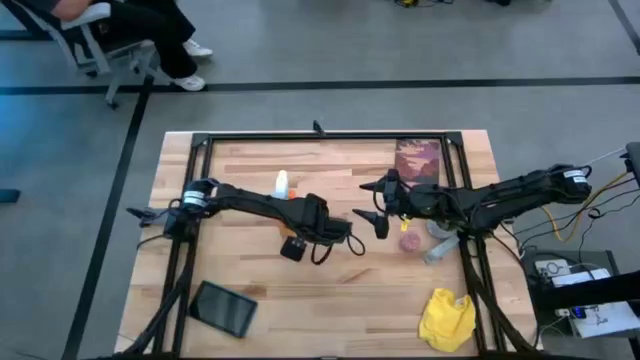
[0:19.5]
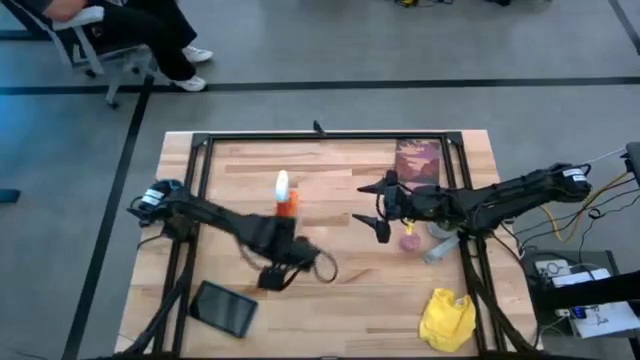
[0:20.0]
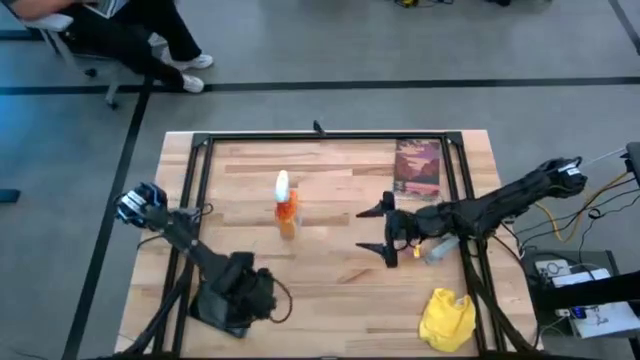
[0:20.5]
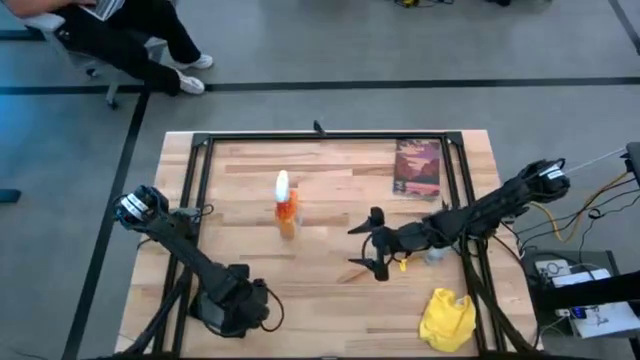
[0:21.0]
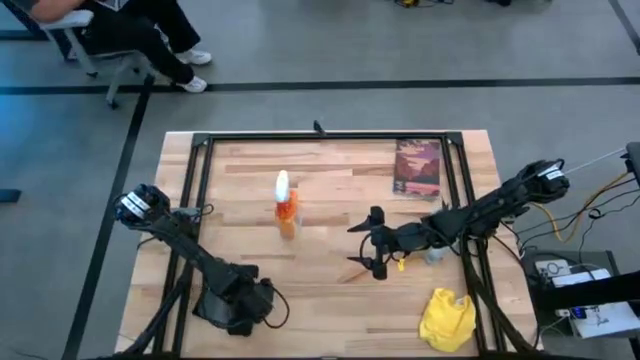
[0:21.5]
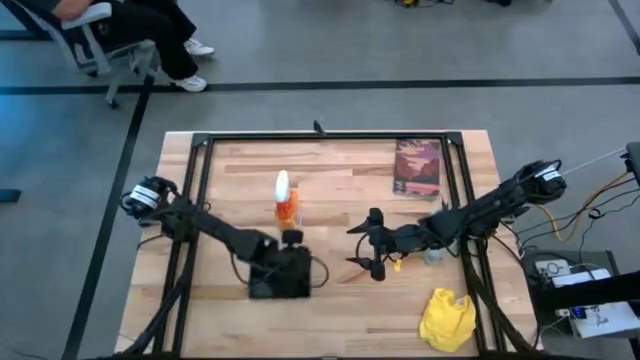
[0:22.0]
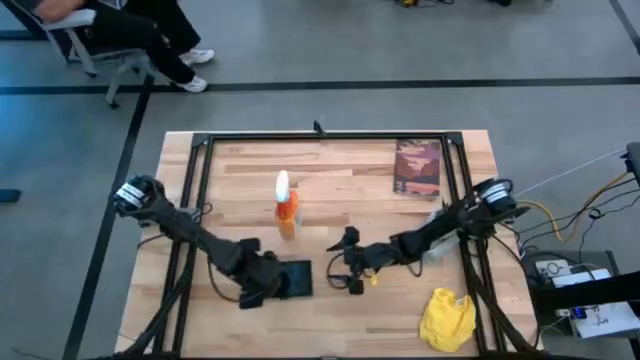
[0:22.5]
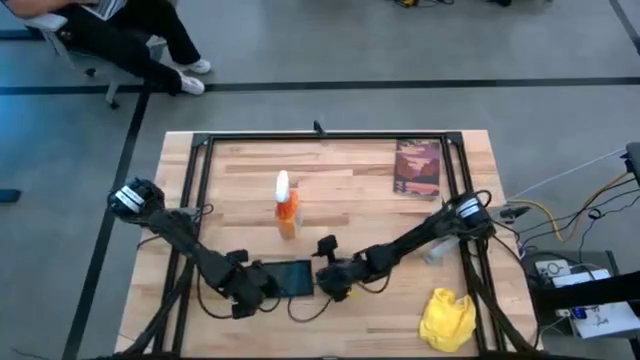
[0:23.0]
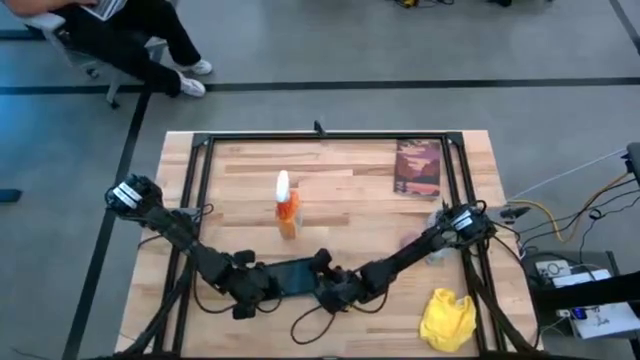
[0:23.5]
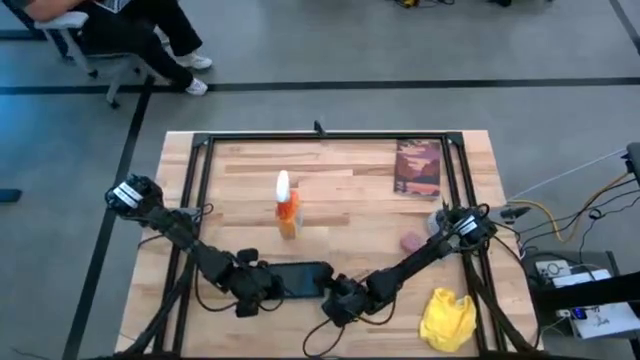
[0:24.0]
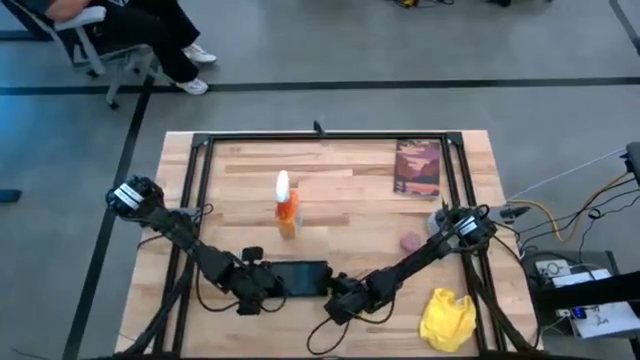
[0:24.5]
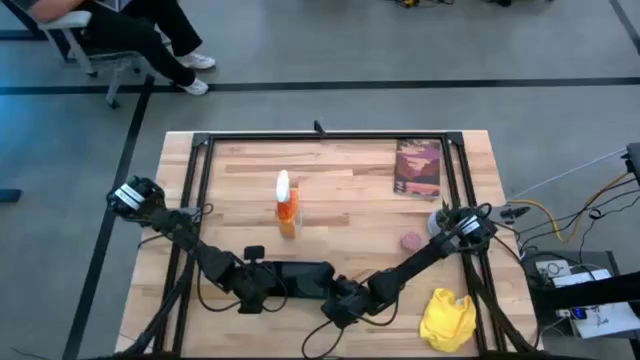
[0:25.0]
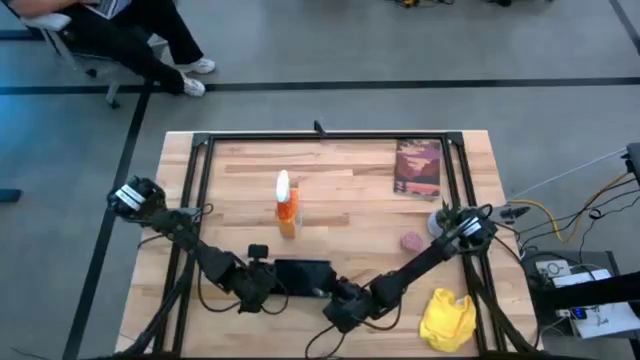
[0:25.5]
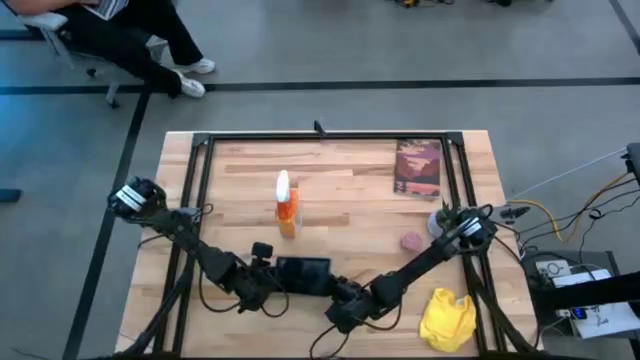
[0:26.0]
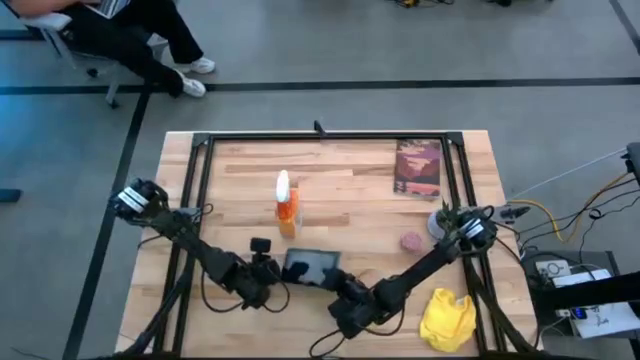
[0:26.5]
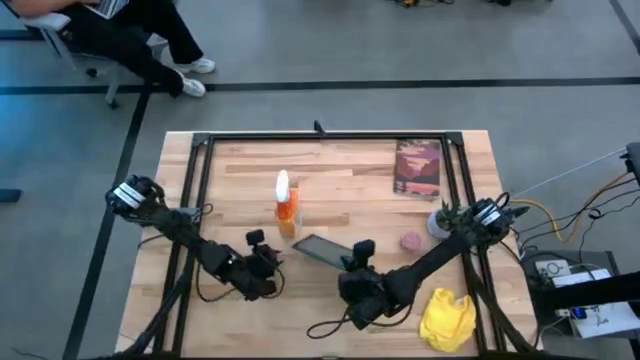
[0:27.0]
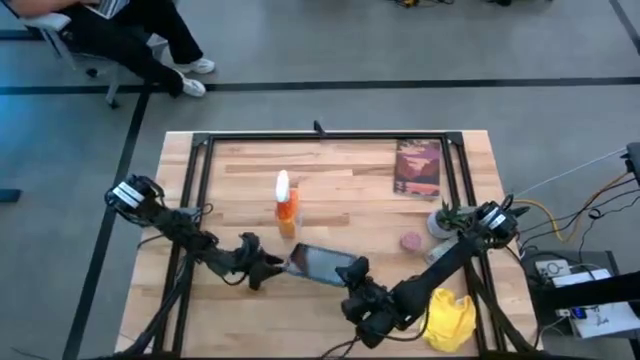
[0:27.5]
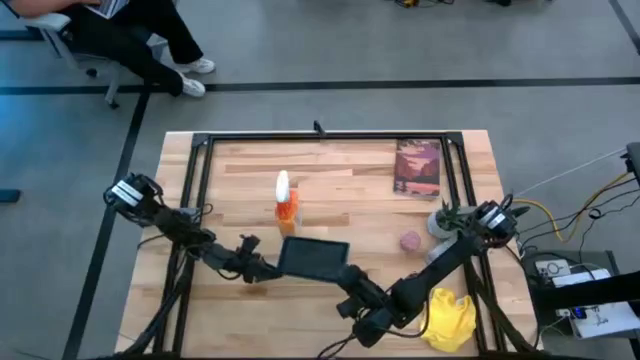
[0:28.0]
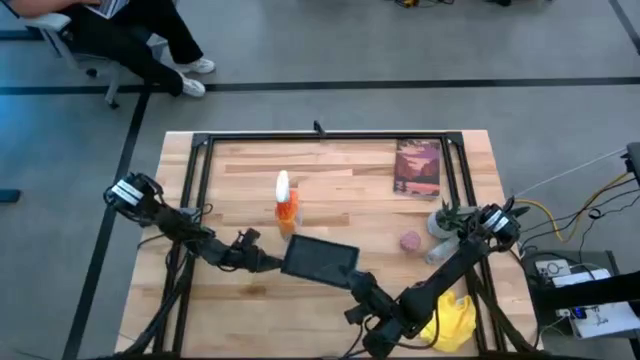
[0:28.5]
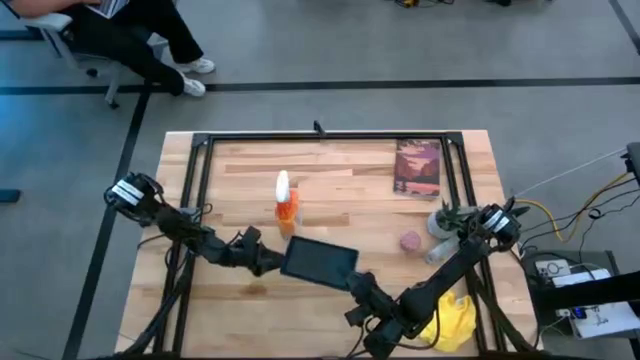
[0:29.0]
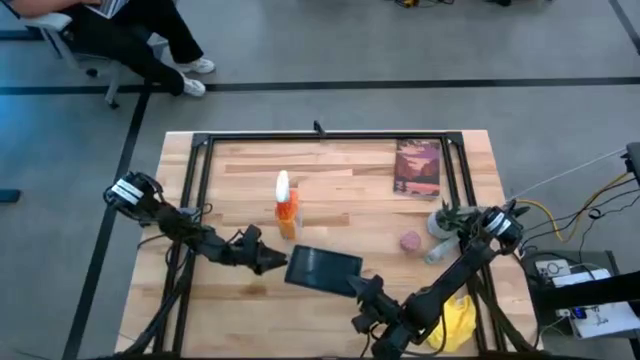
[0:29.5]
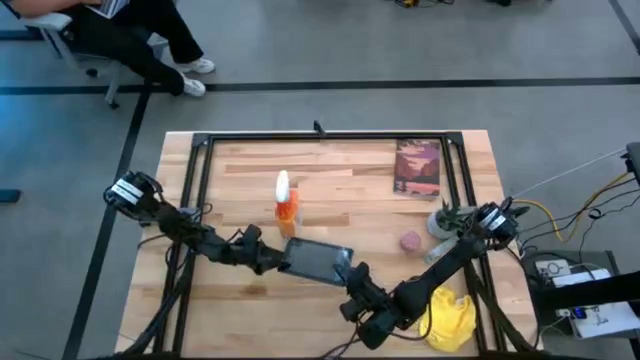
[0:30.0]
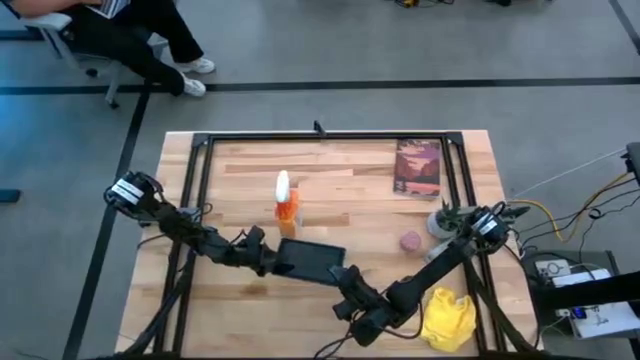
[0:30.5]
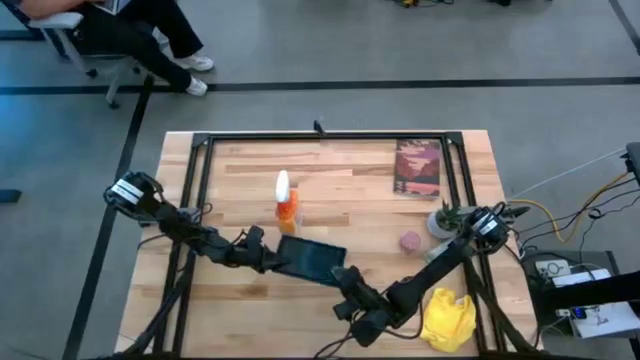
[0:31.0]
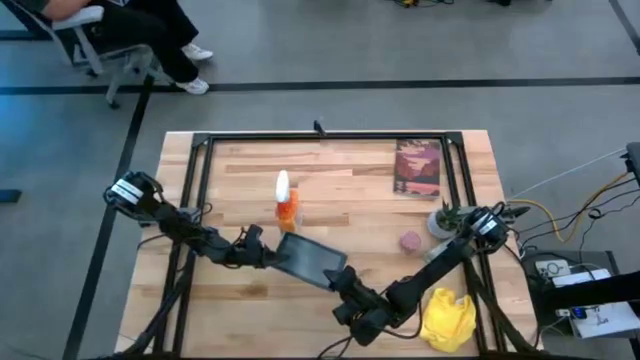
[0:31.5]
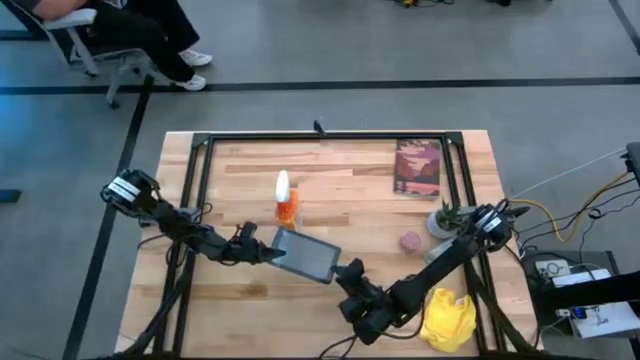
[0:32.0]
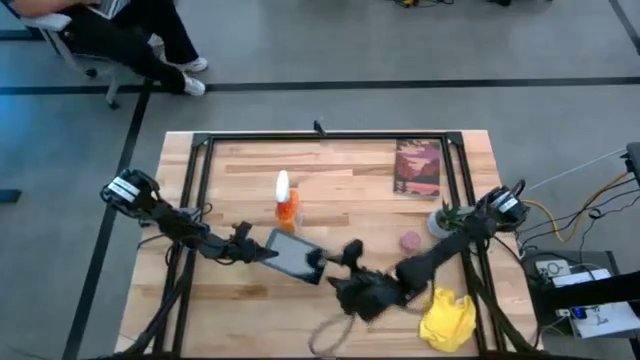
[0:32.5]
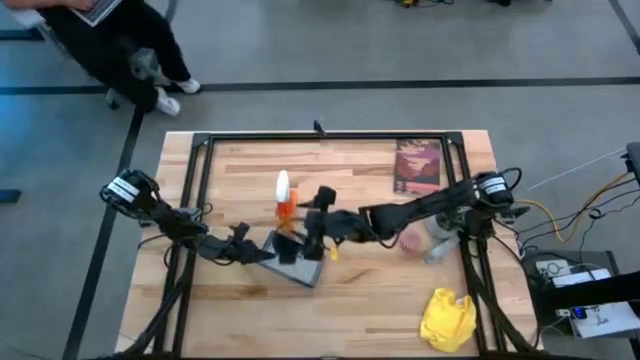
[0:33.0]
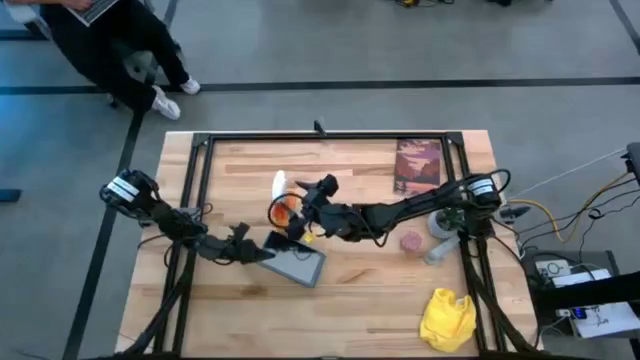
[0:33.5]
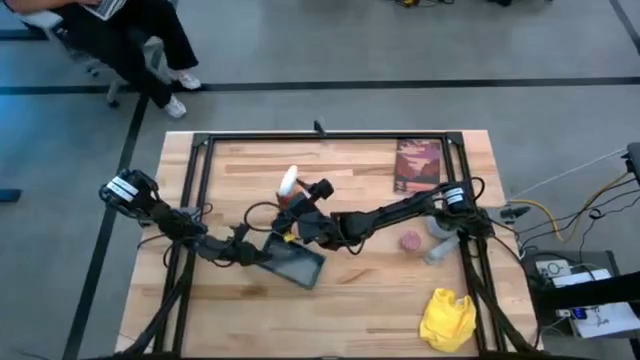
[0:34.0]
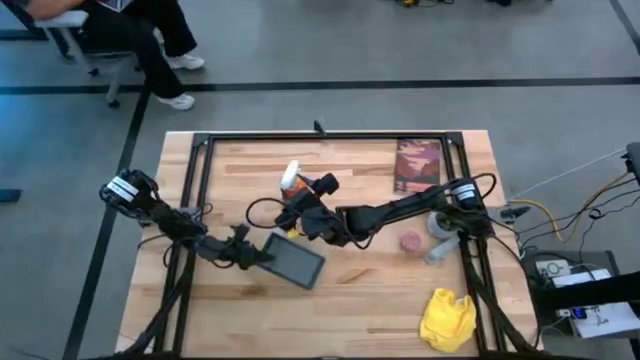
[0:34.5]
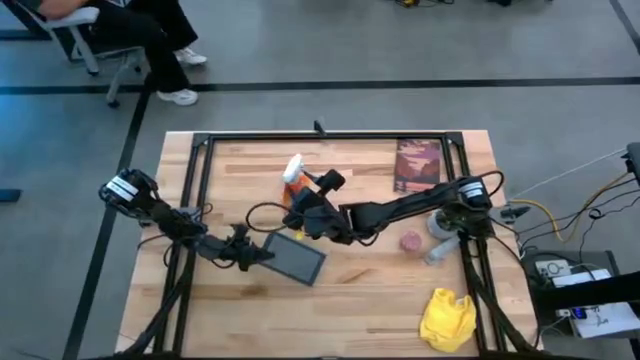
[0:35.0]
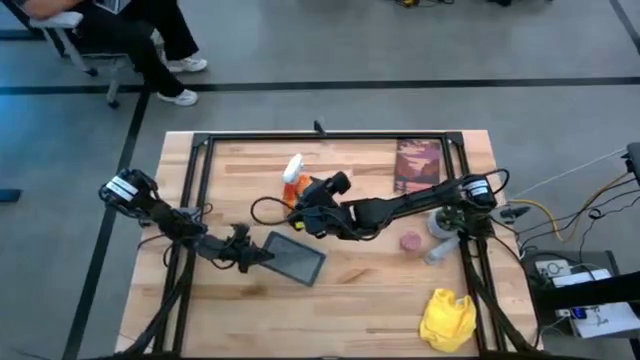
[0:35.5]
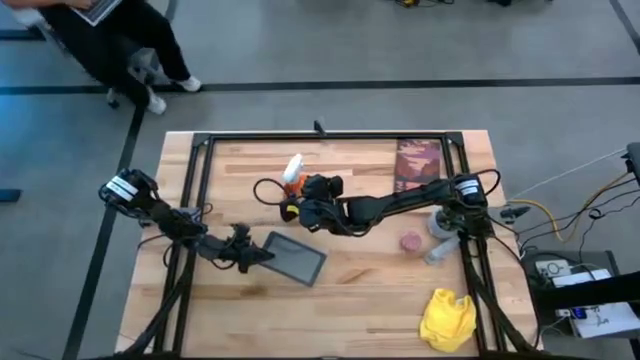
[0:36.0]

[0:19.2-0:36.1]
Task: Apply microfiber cloth
Spray the front and back of the tablet with the spray cleaning bottle

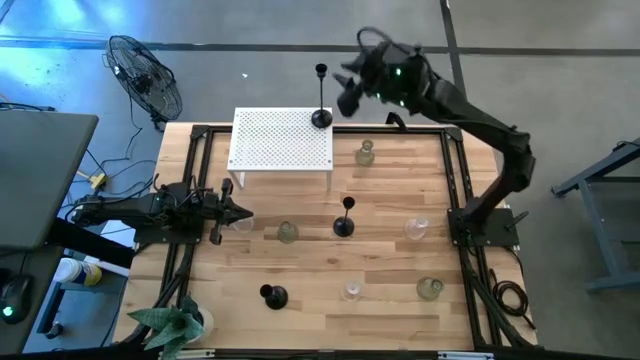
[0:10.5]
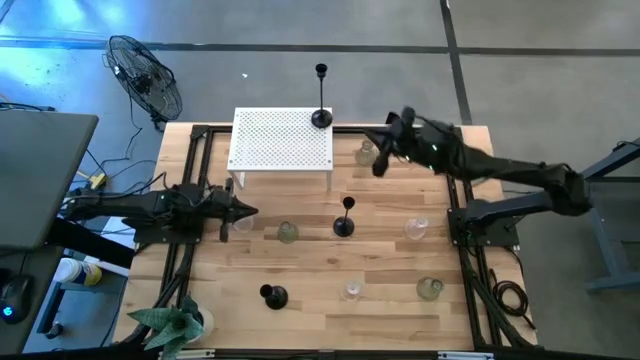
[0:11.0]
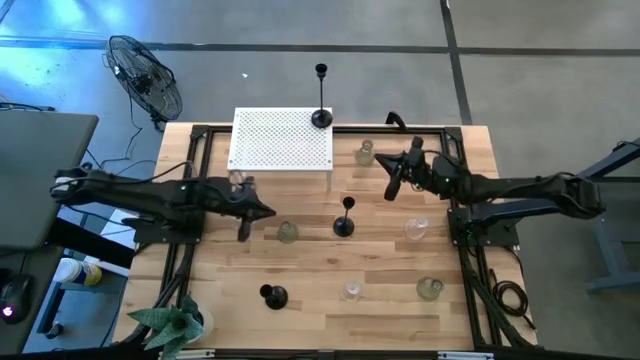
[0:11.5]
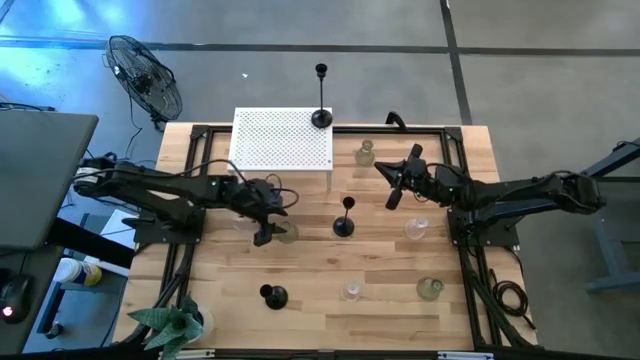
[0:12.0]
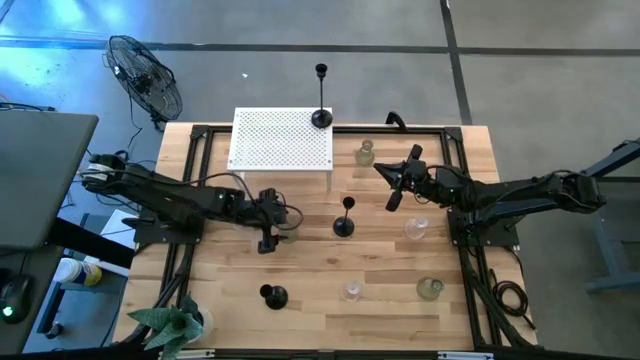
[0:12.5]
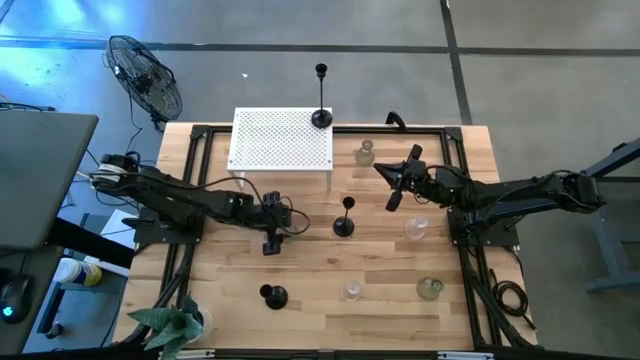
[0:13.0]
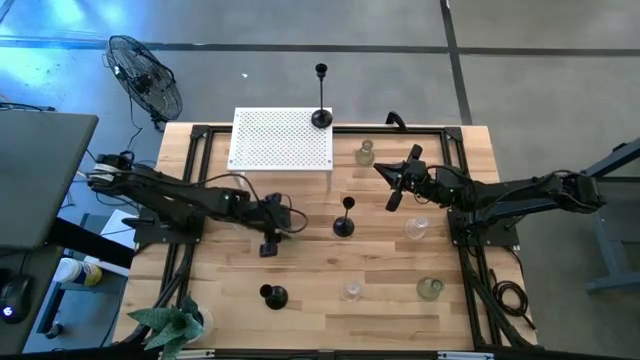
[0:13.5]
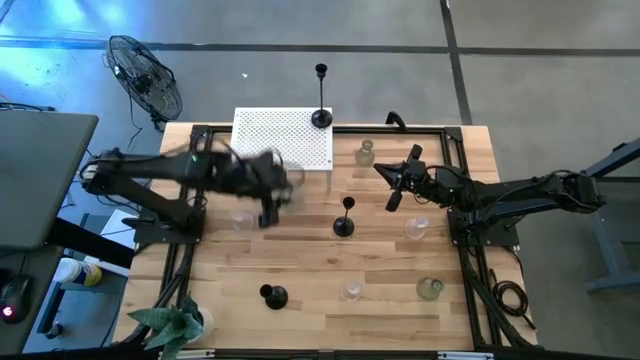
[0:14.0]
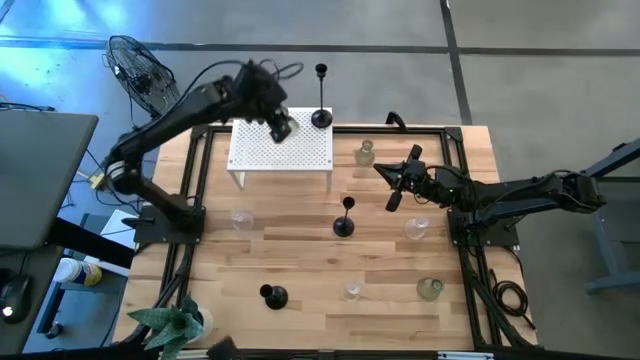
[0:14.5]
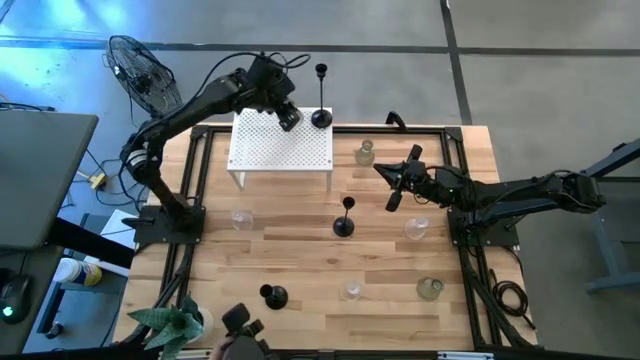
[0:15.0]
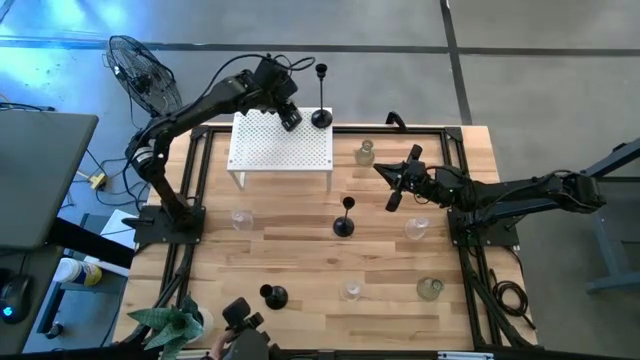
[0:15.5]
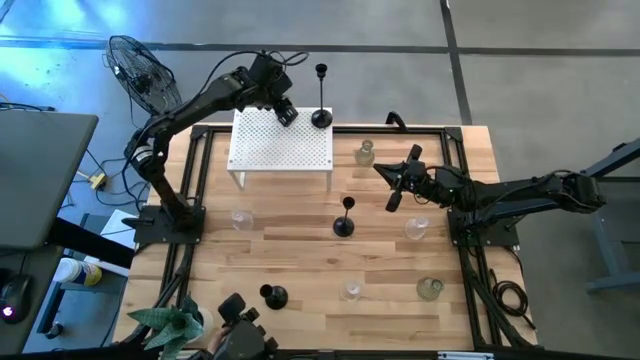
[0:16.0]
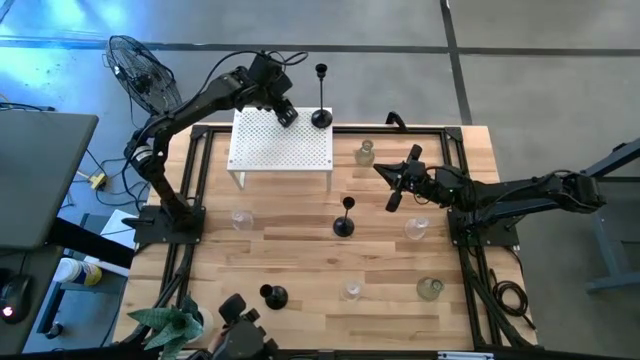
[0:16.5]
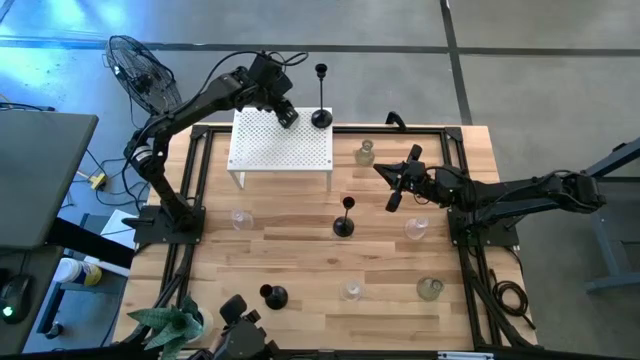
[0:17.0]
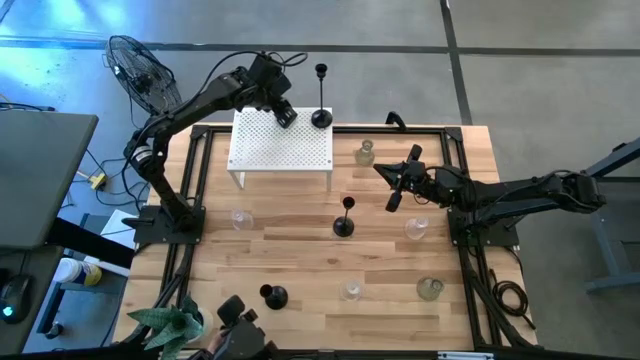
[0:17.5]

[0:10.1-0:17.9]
Task: Pick & Place candle stick holders
Put the middle green candle holder on the shelf
